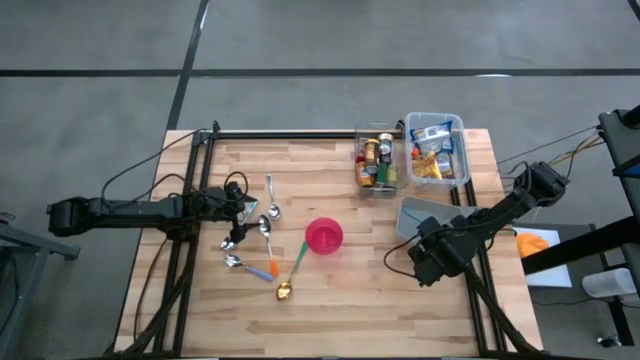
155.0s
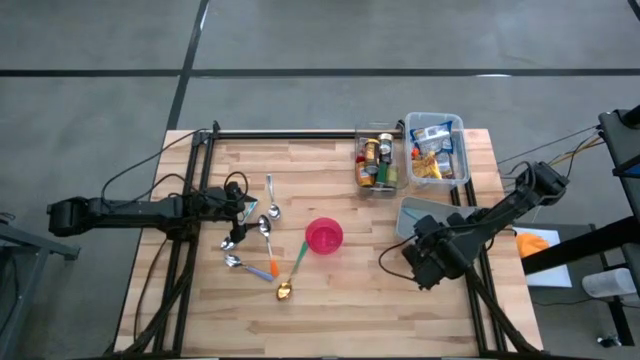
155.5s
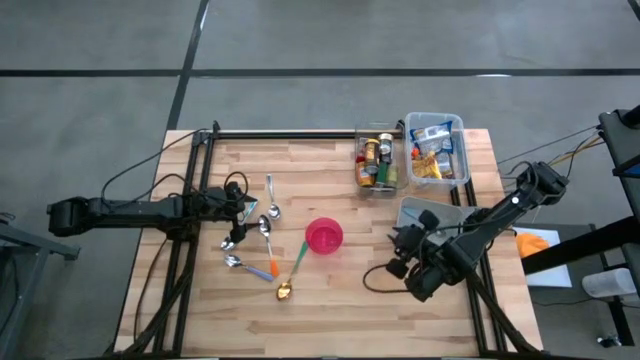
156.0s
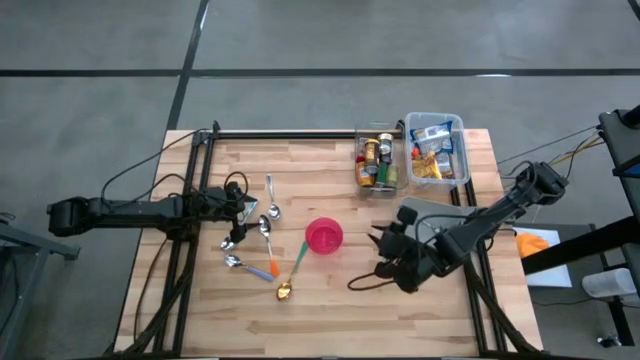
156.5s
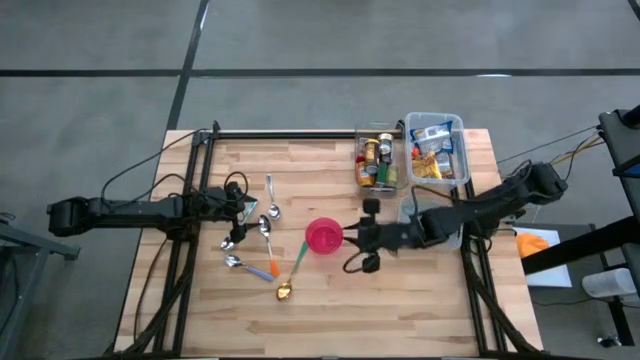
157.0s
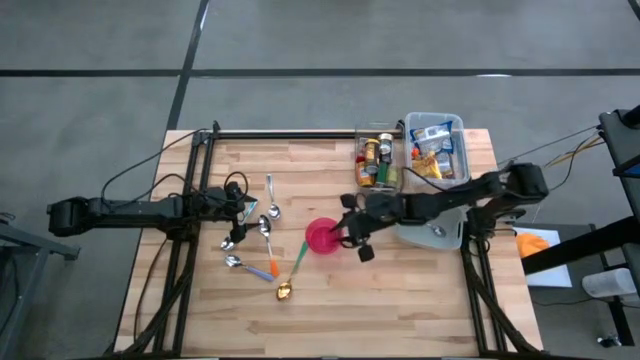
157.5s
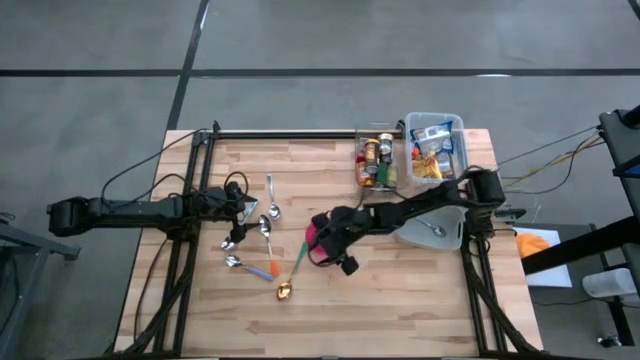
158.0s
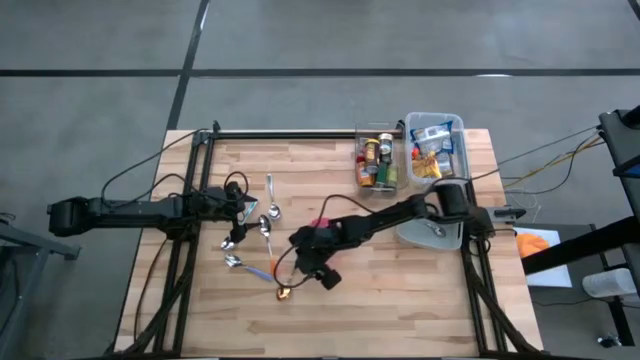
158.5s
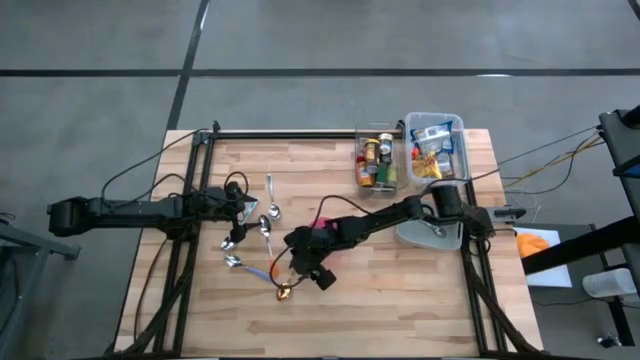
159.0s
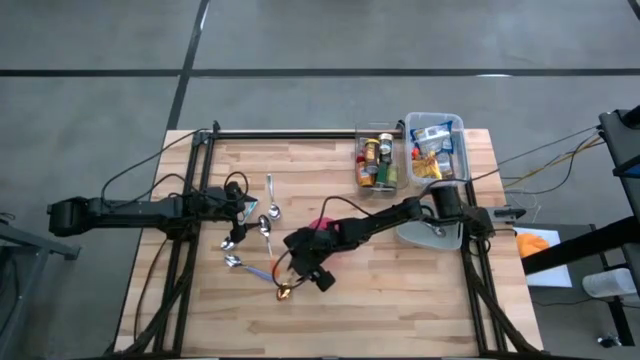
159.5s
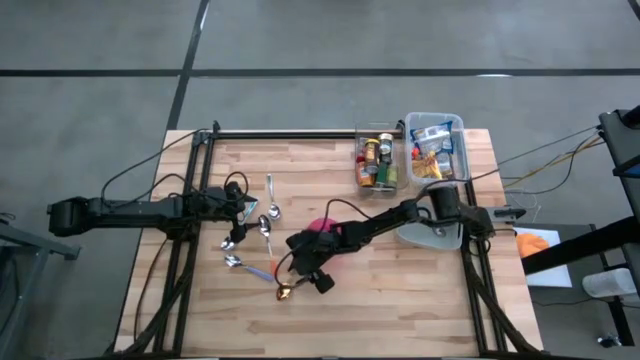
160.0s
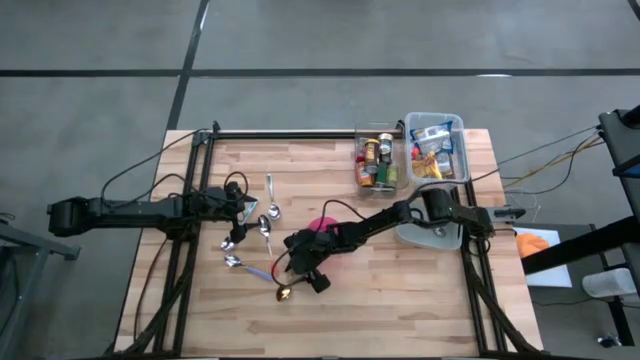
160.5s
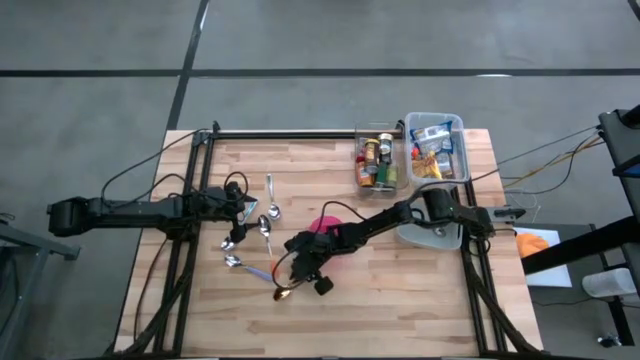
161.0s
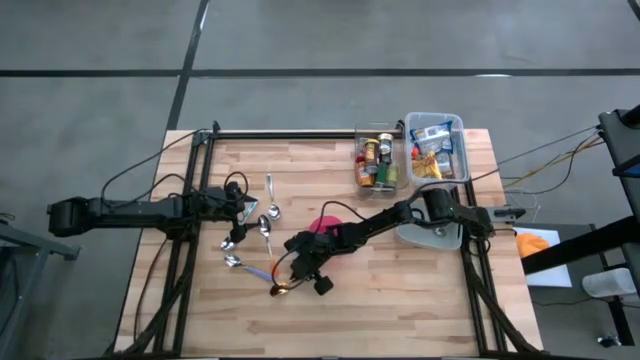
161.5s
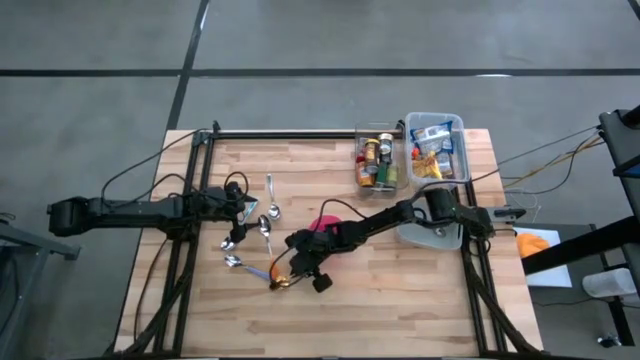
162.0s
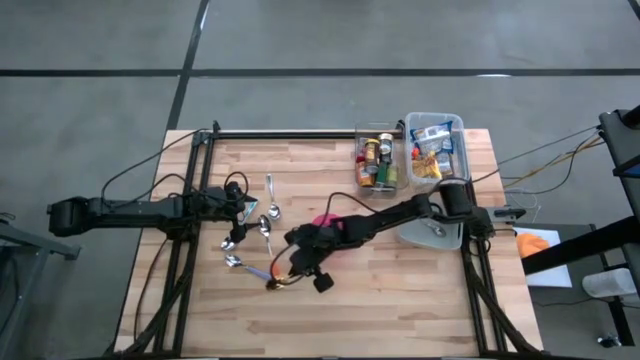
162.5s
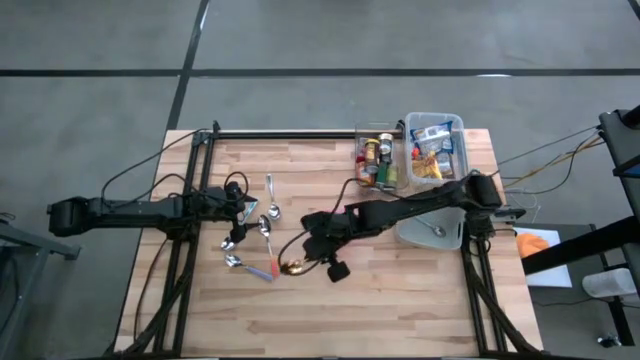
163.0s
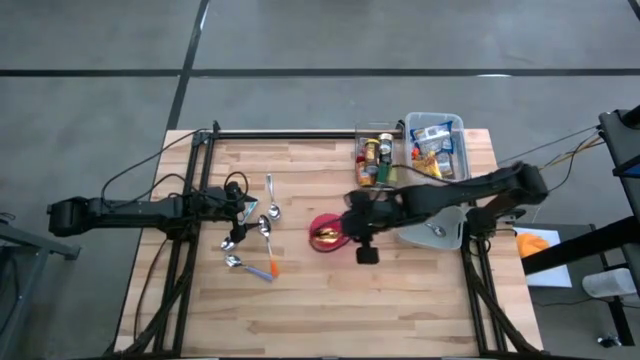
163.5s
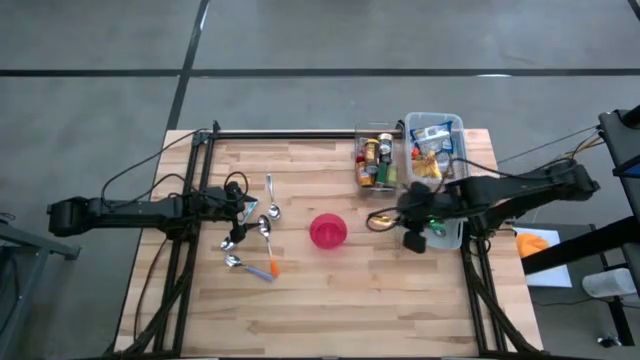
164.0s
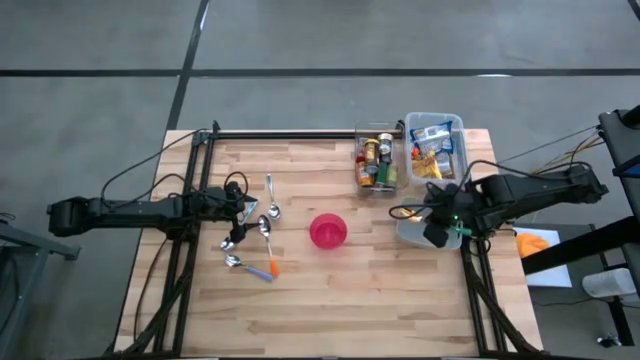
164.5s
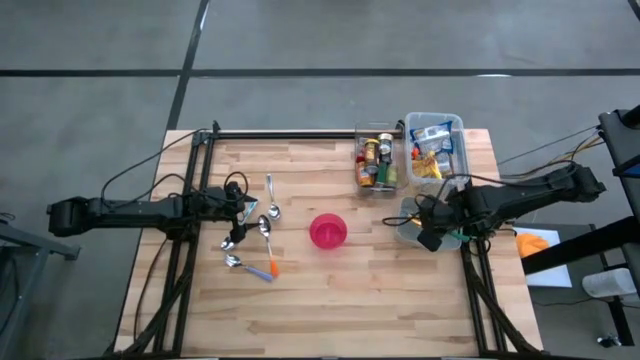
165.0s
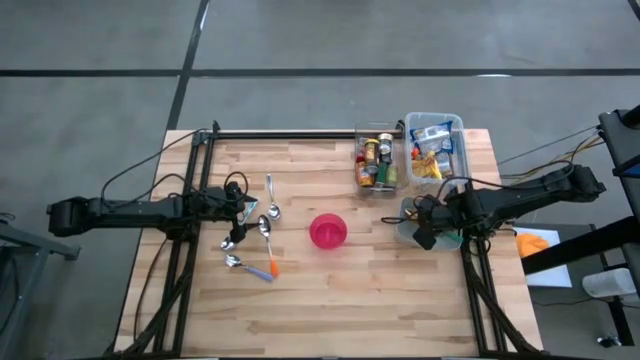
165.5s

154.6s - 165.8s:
Put the green spoon into the gray bin

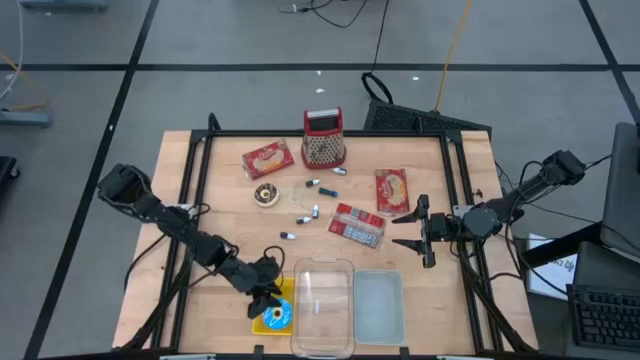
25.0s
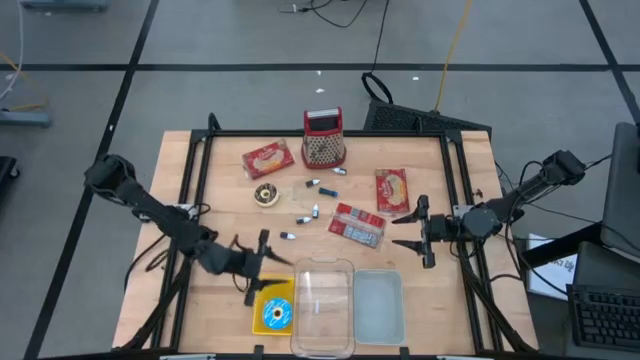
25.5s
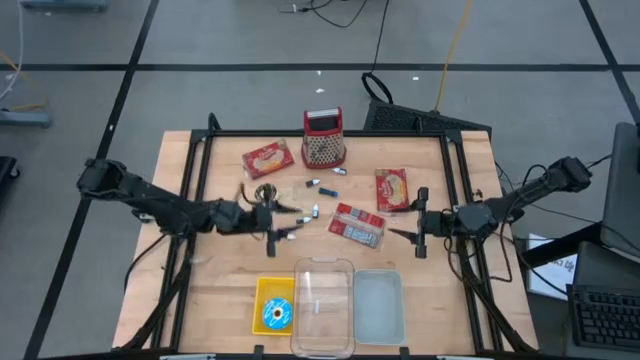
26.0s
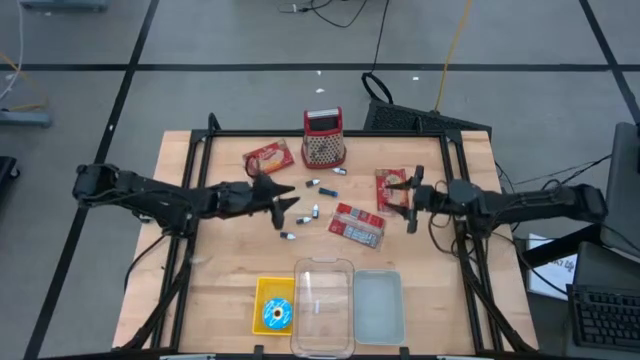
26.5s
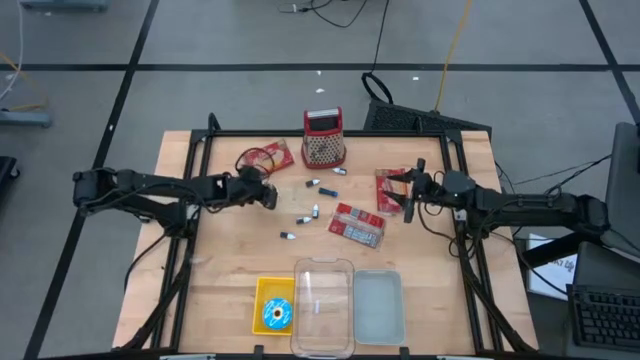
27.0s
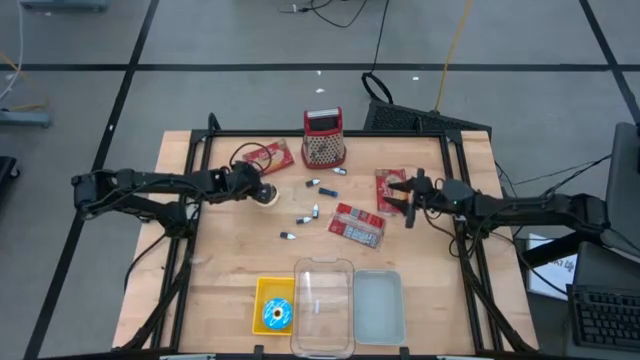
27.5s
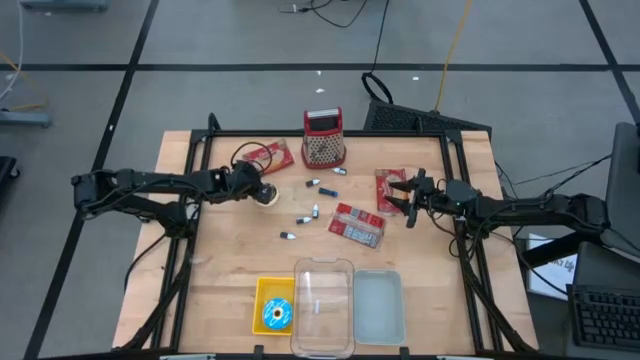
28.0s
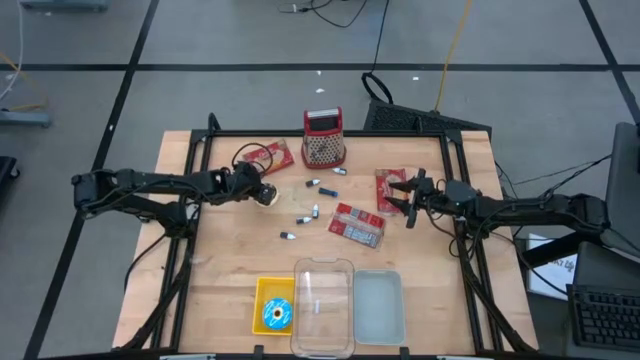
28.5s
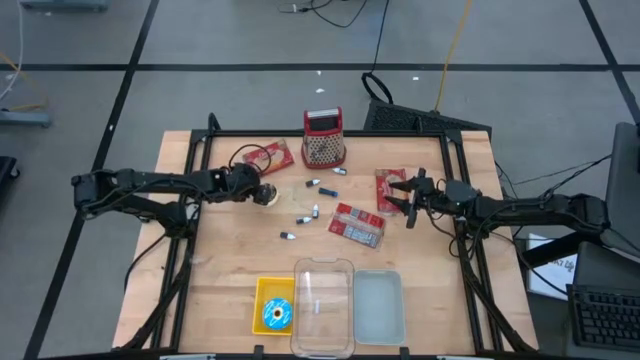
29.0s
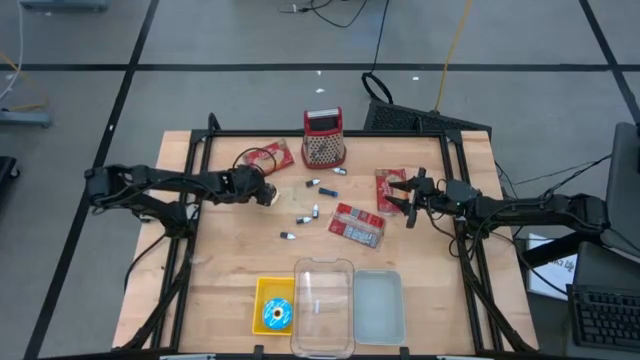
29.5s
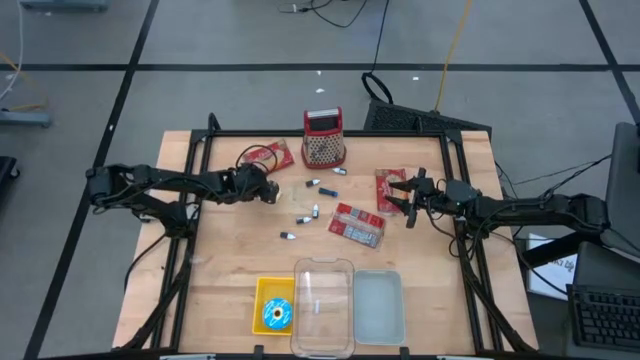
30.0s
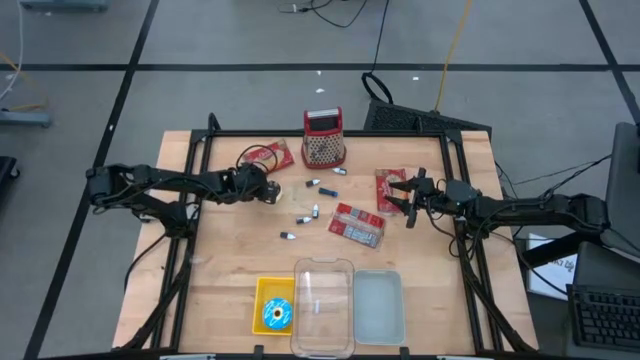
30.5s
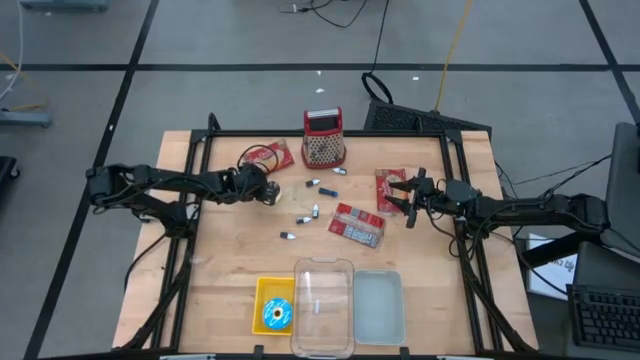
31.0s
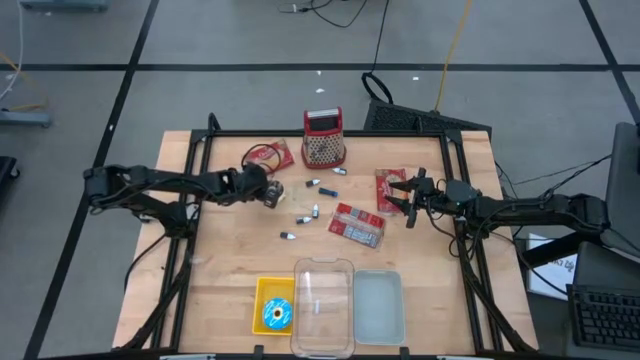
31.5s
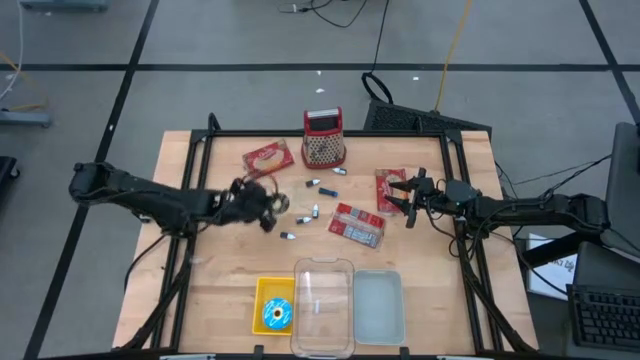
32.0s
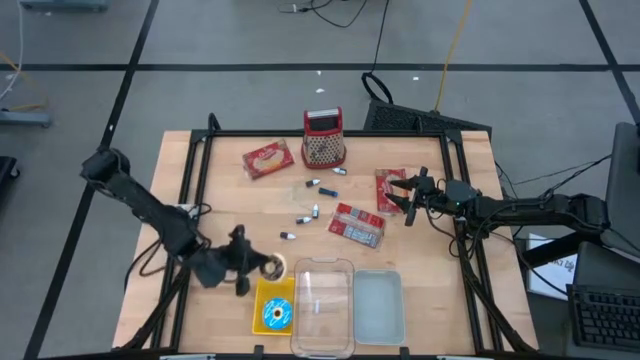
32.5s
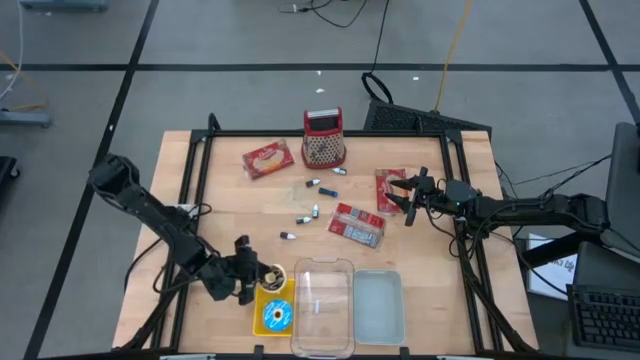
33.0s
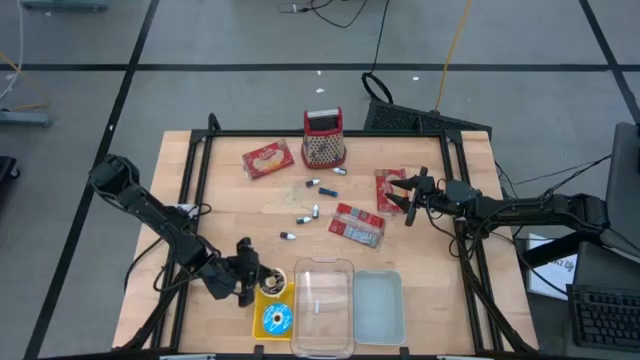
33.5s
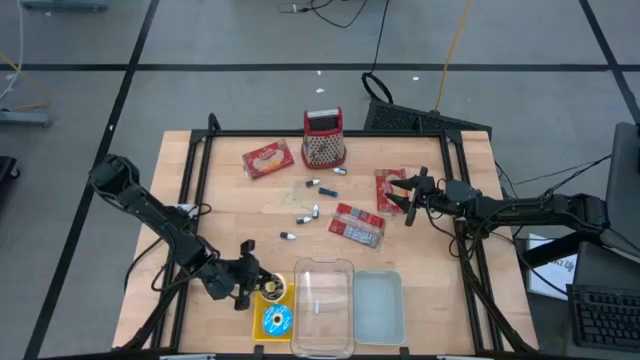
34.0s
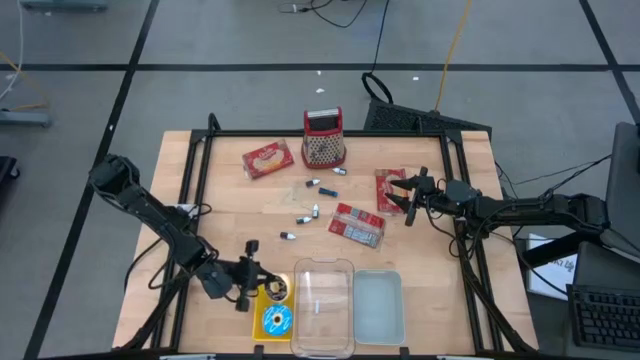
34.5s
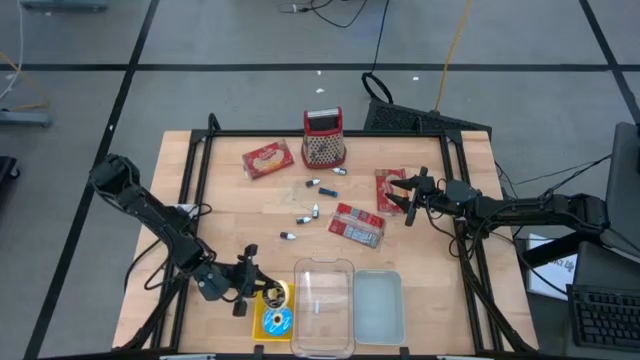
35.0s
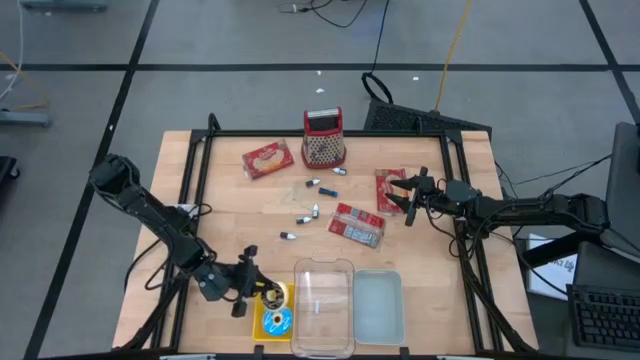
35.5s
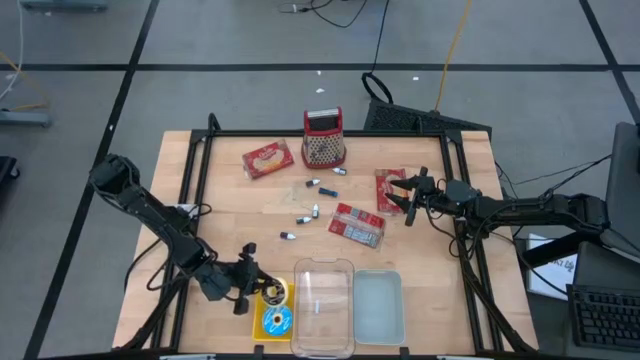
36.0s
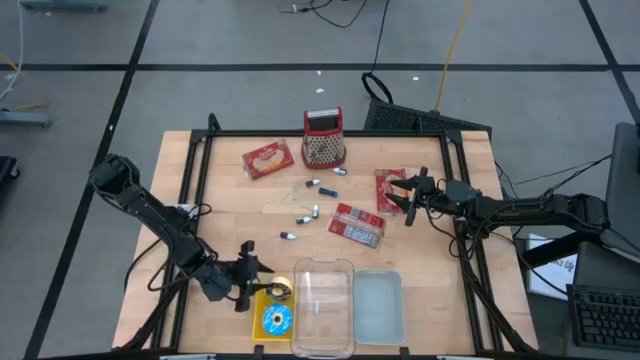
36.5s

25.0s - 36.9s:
Put the black donut into the yellow bin
